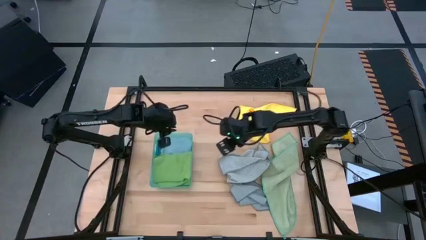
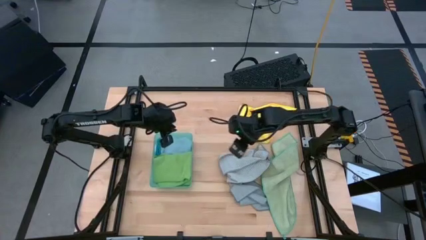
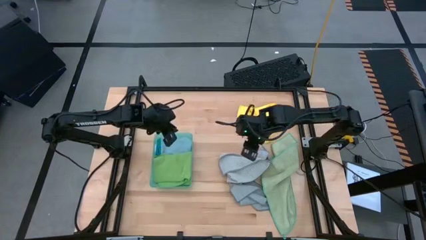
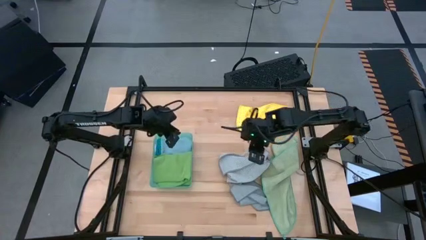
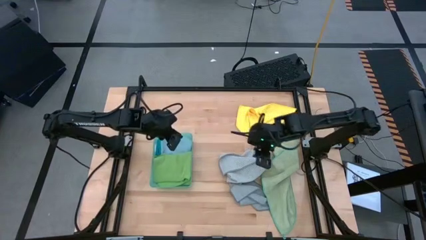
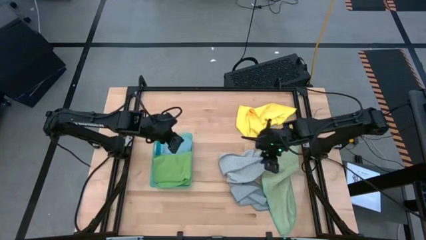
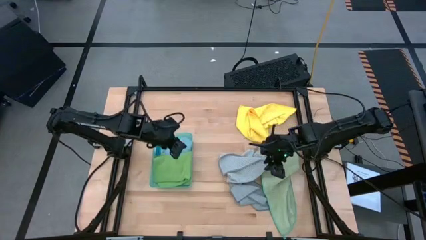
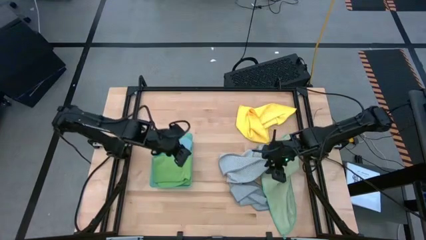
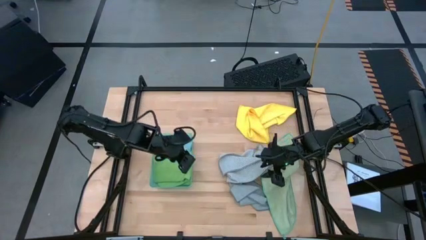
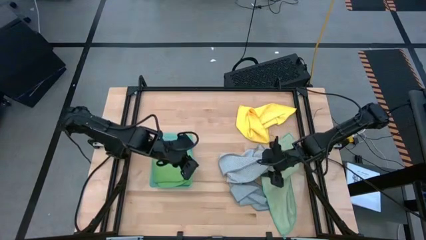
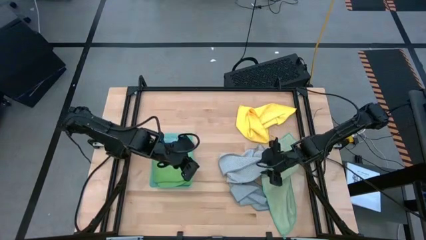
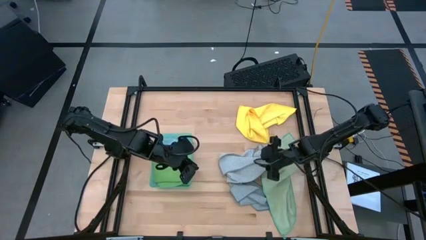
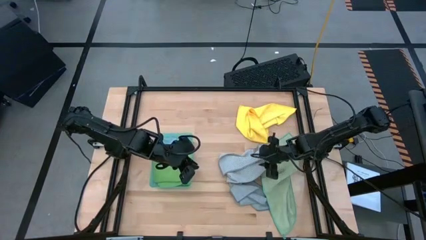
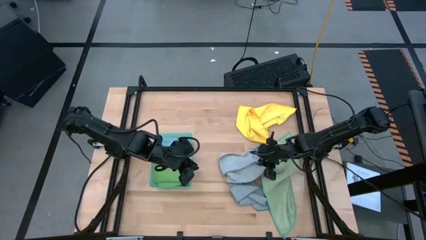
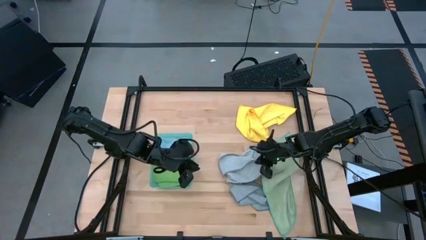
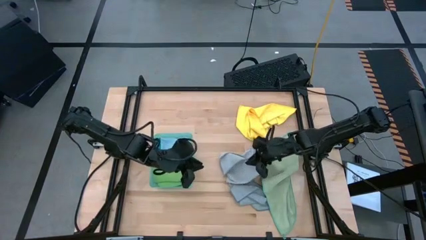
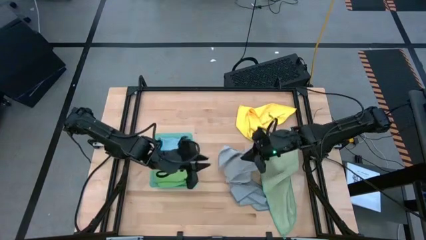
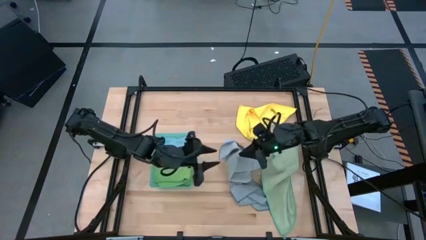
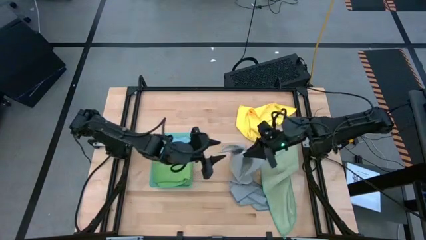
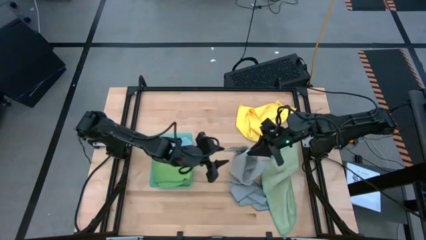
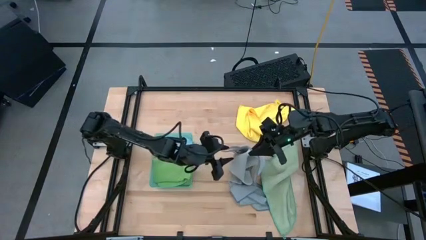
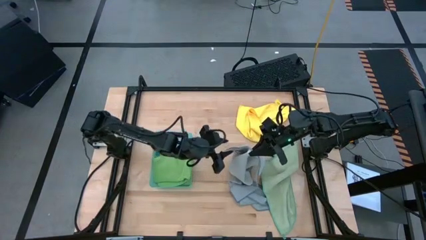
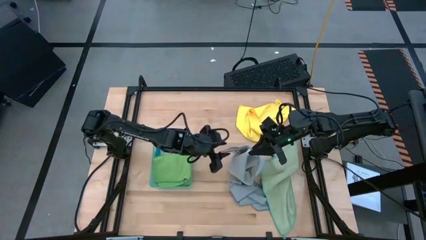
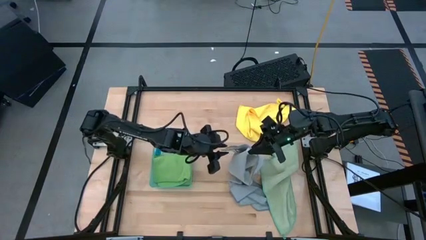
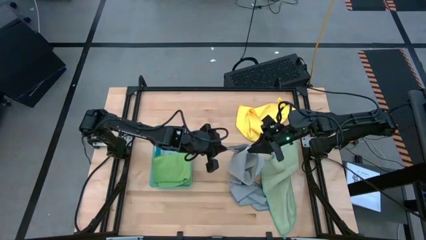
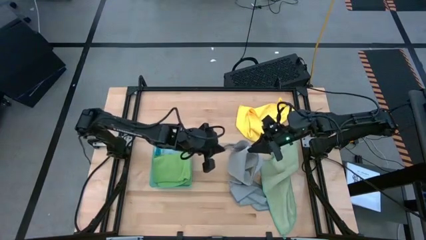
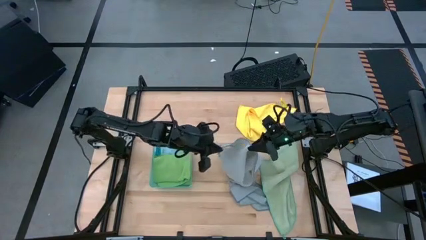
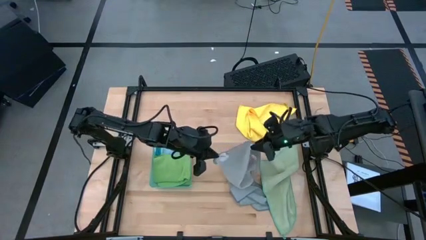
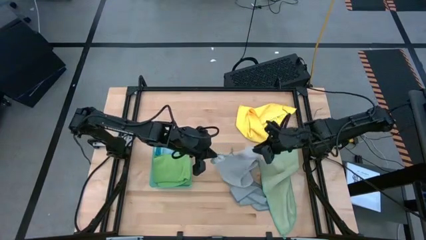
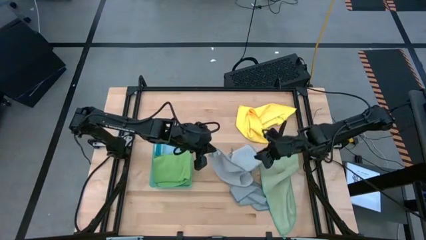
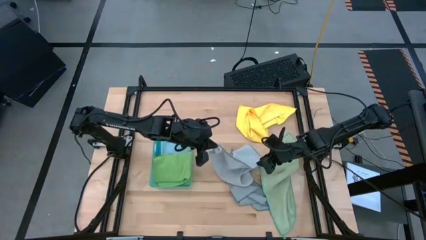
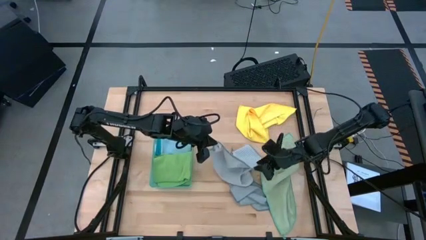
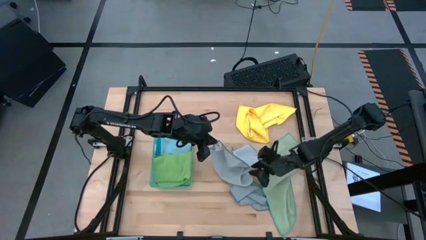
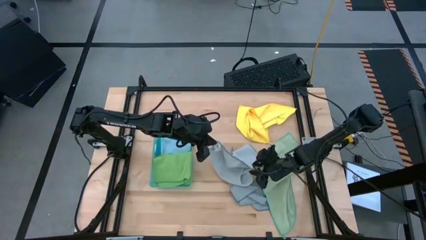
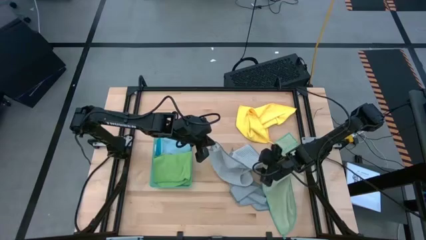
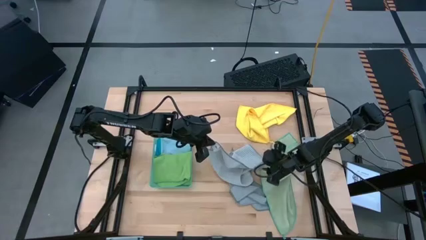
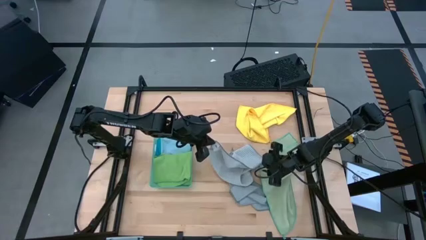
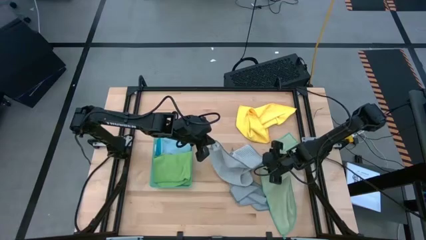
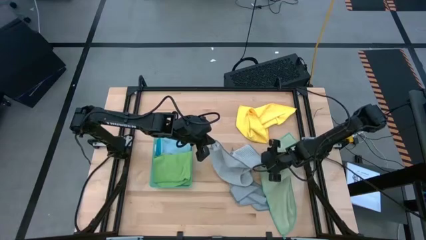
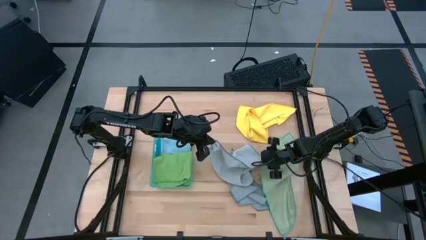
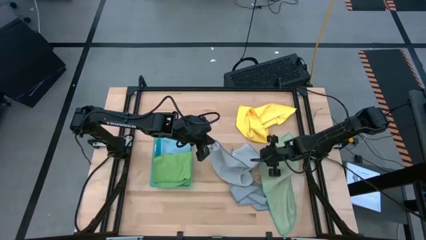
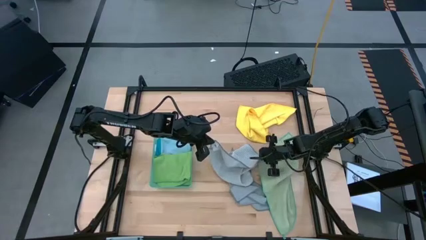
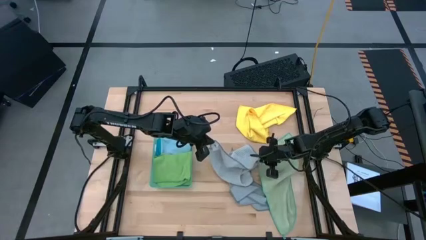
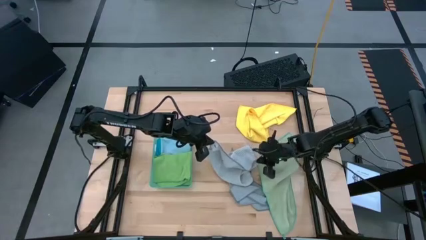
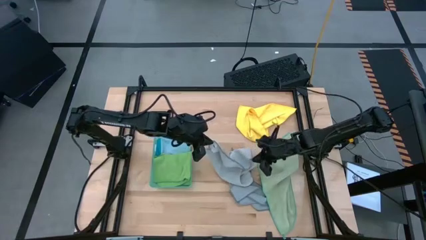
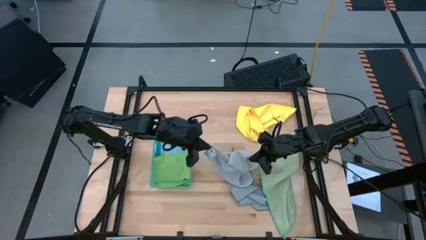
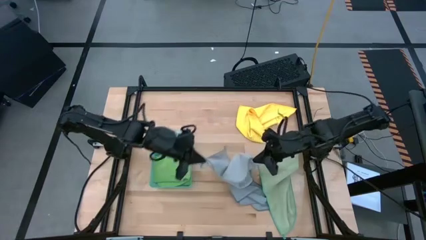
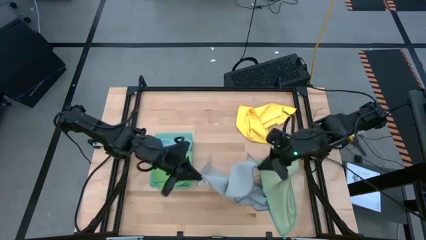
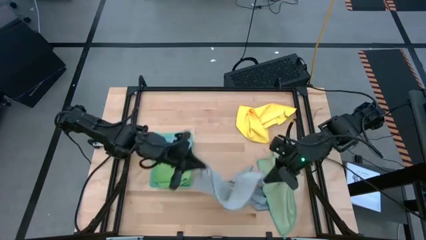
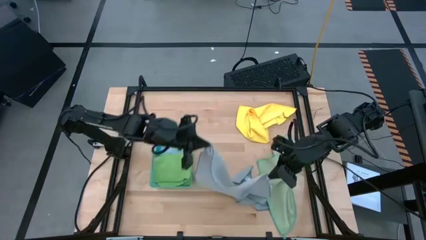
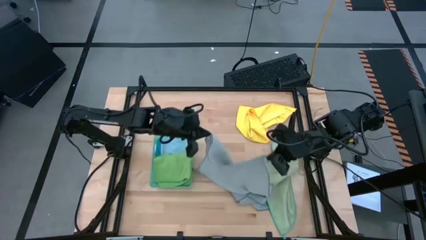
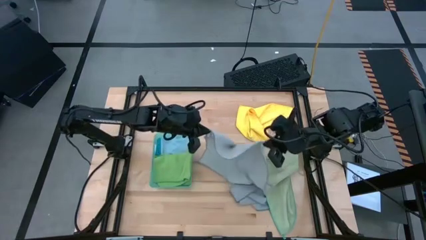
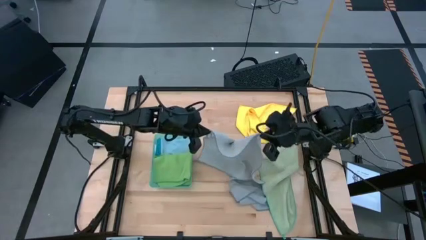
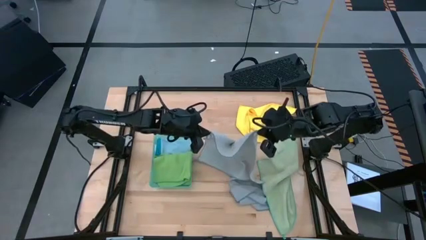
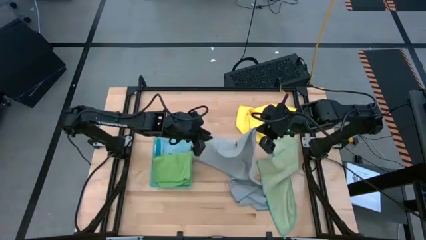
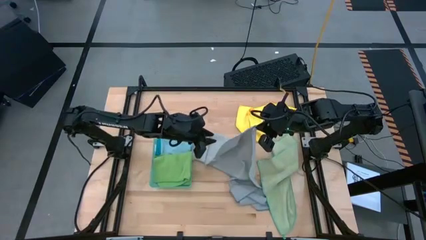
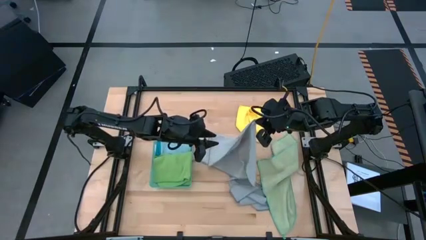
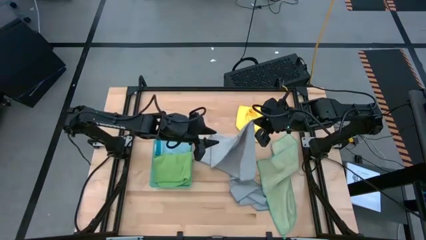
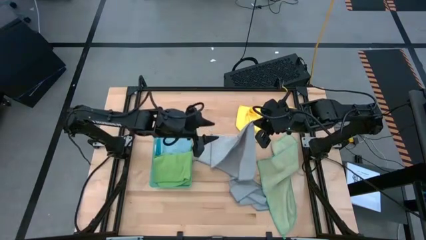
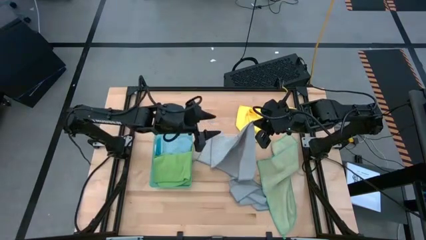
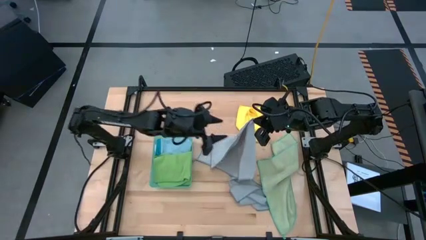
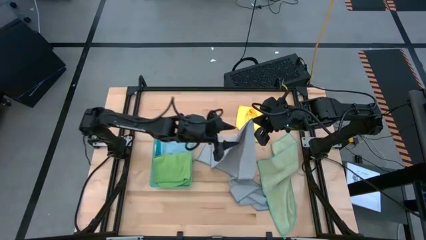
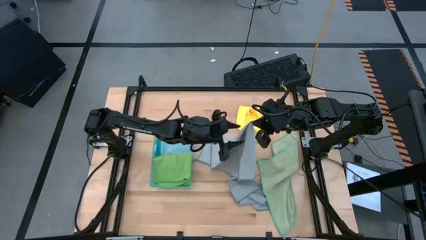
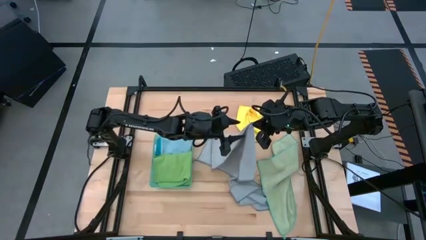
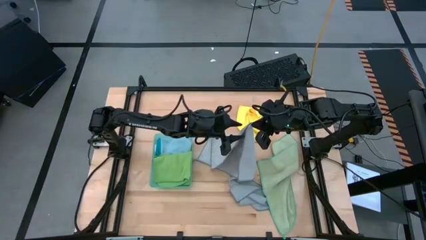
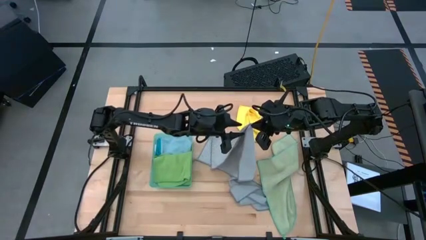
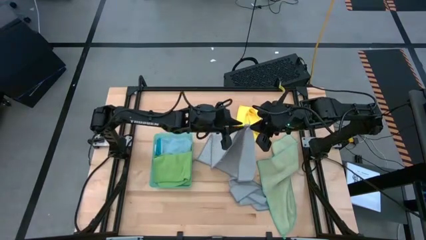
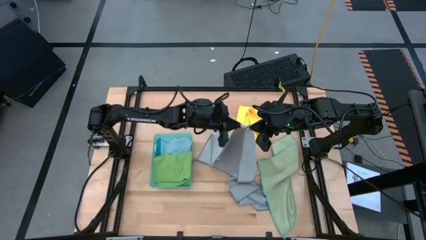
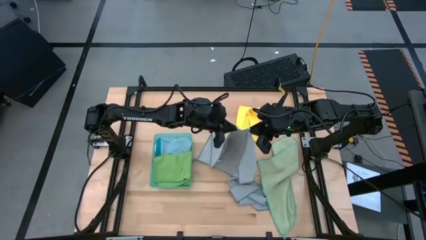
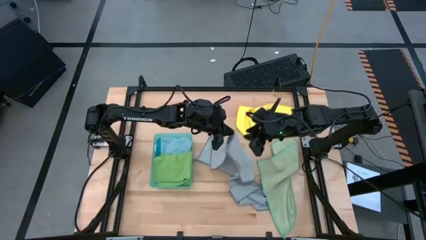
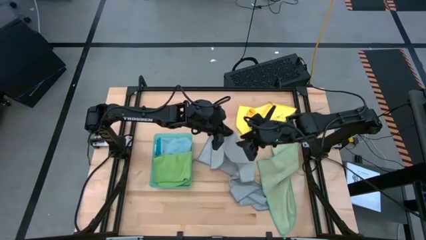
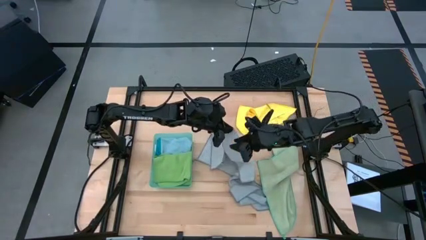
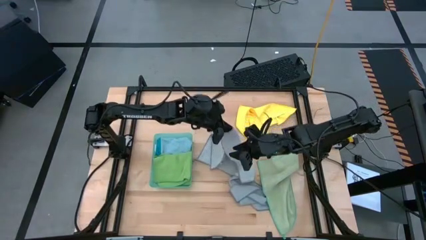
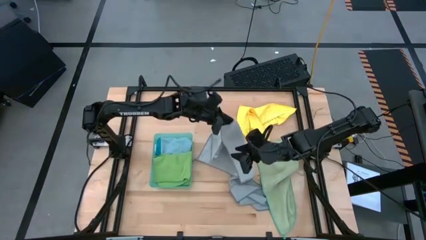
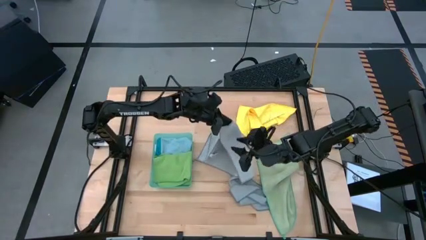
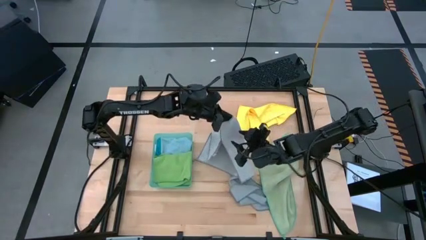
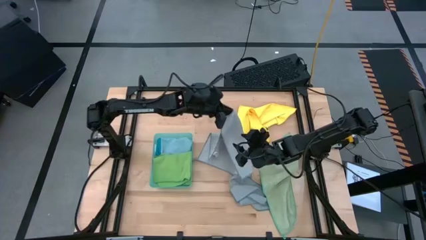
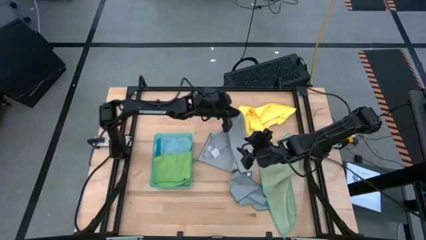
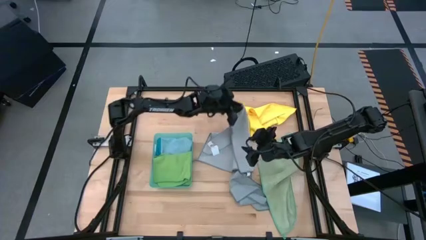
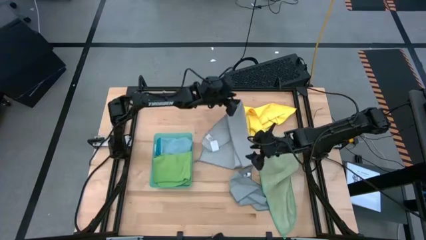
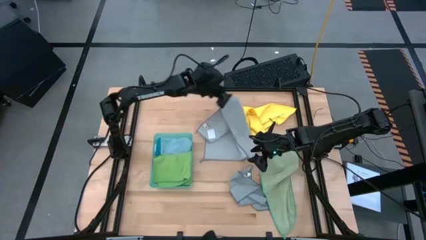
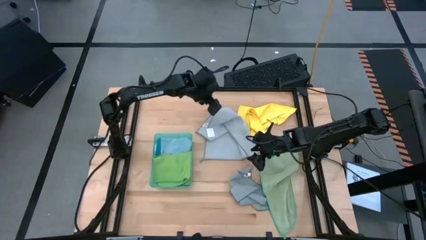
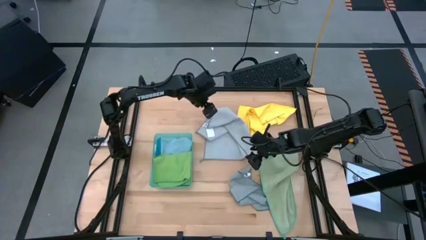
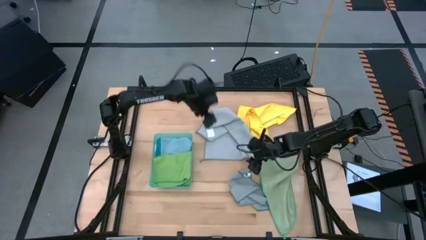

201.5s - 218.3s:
Task: Fold microfiber towels
Fold the top gray microfiber cloth

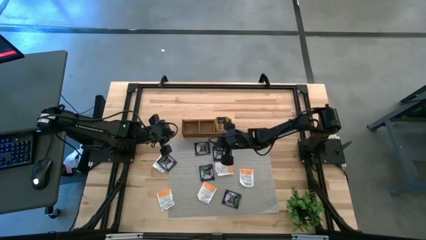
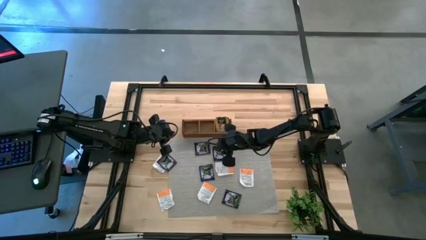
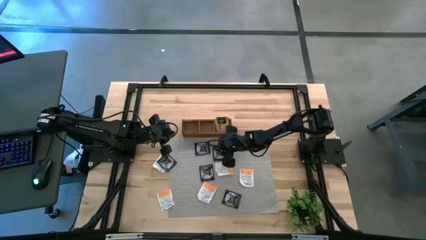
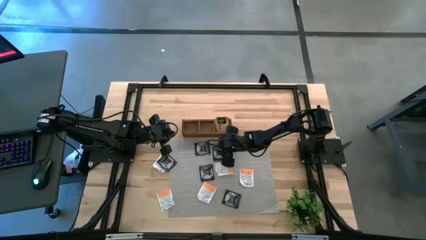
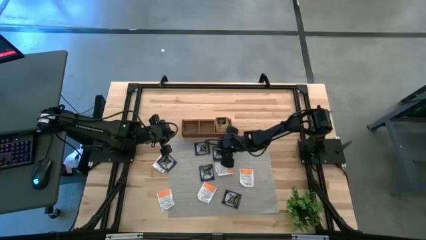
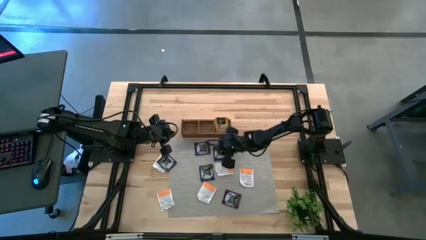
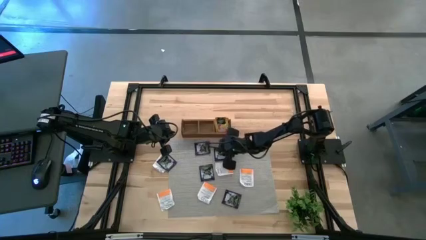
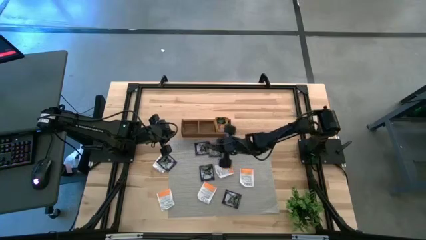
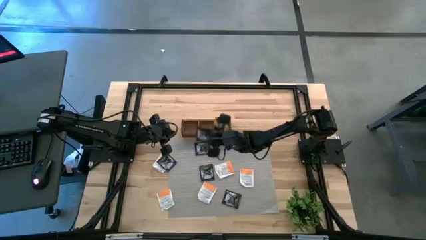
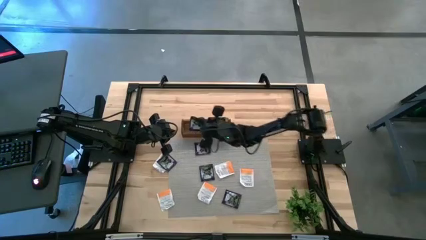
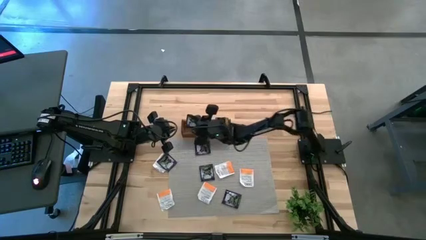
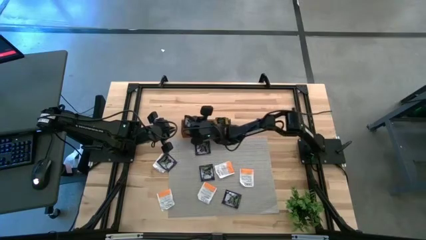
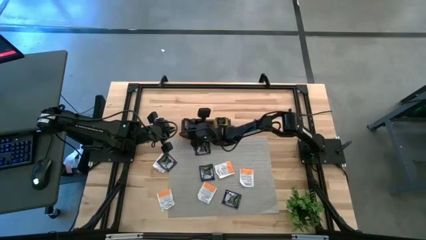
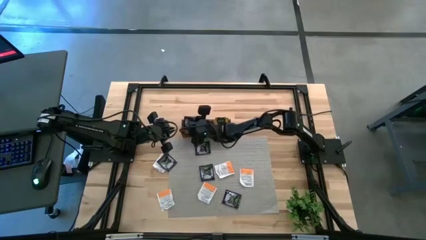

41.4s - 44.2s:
Task: Pick & Place Tea
Put the violet tea bag into the left section of the wooden organizer
